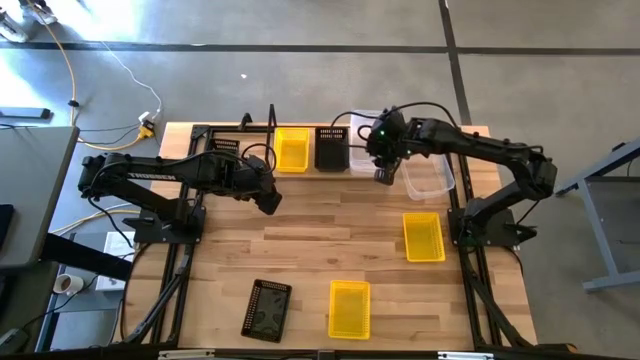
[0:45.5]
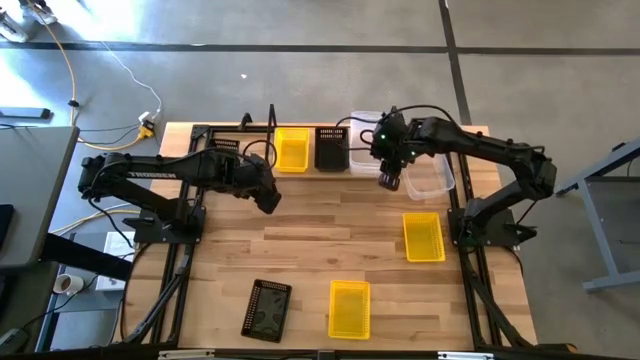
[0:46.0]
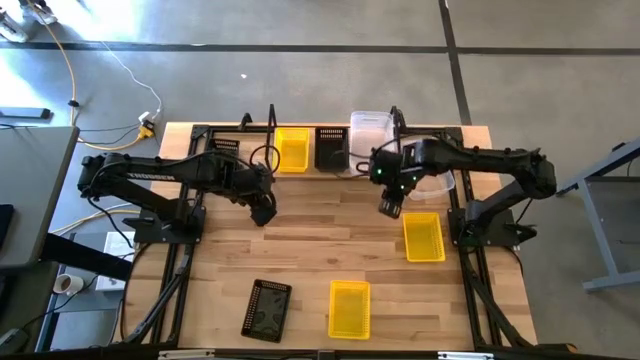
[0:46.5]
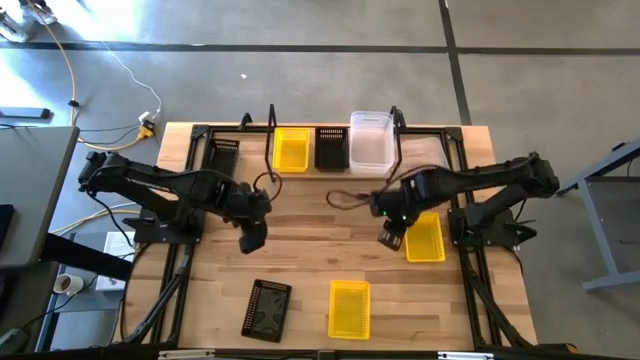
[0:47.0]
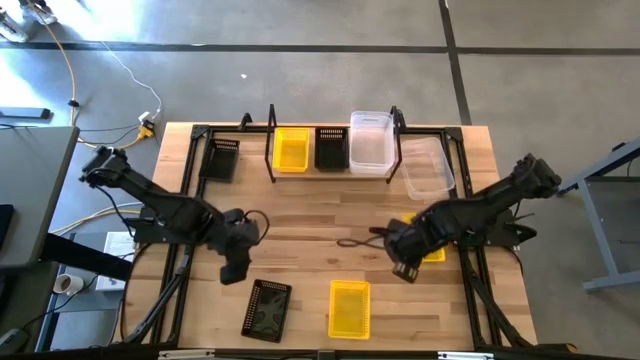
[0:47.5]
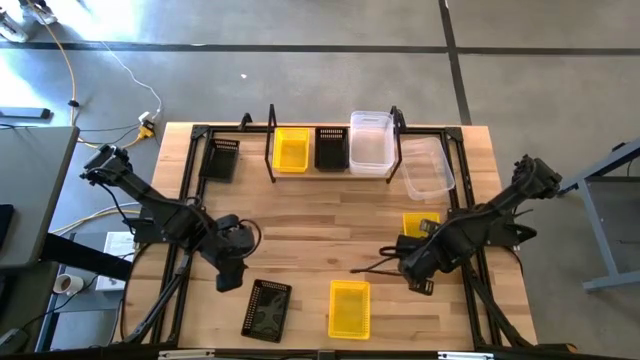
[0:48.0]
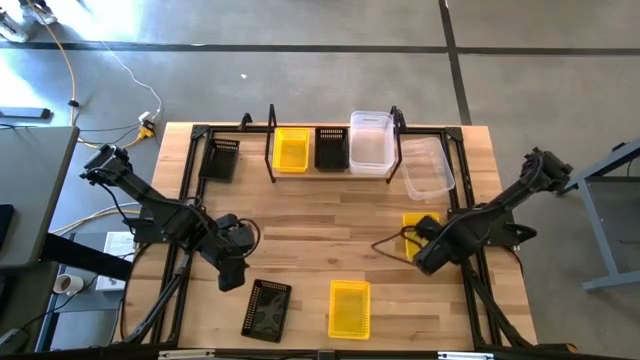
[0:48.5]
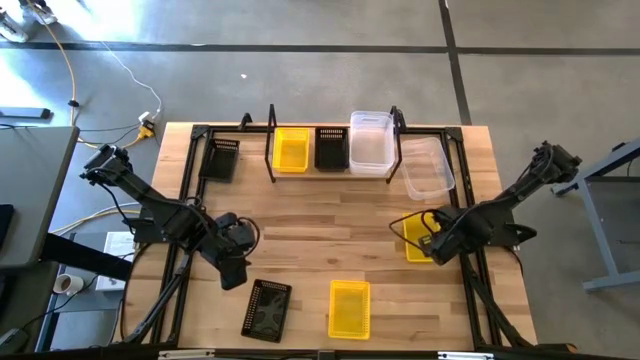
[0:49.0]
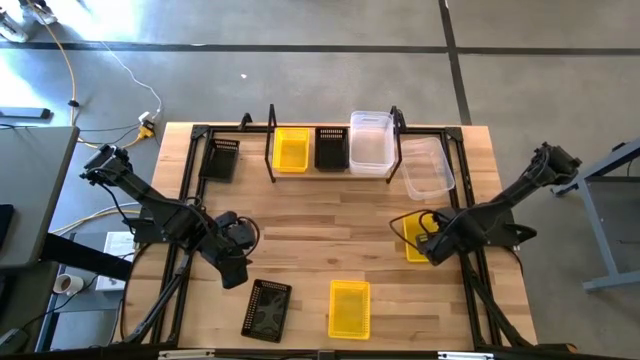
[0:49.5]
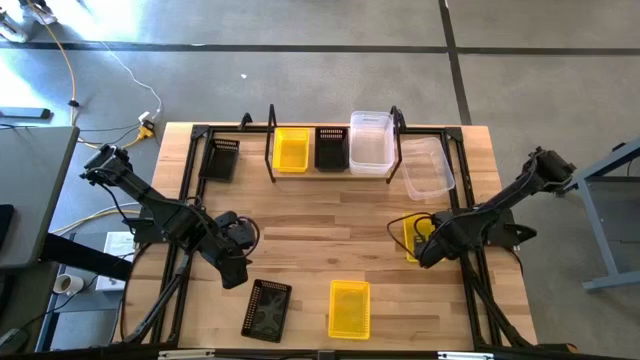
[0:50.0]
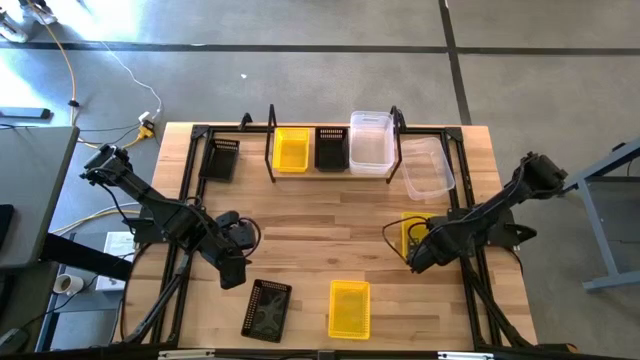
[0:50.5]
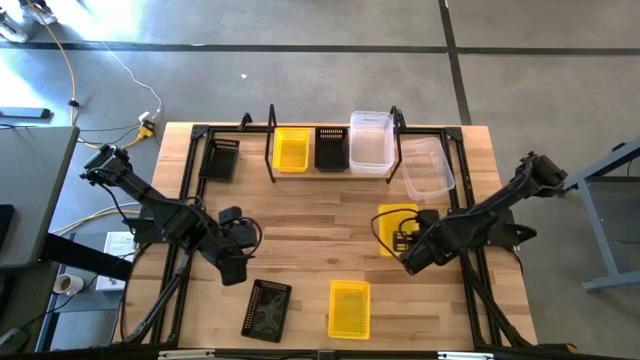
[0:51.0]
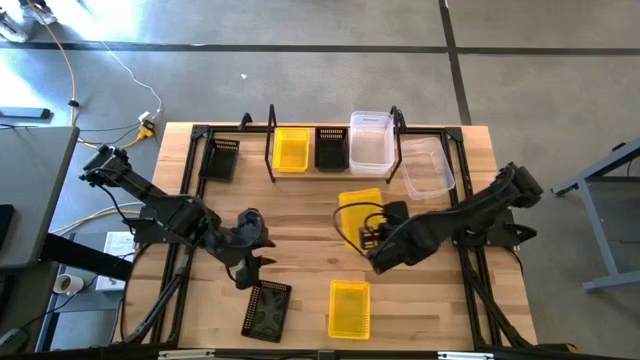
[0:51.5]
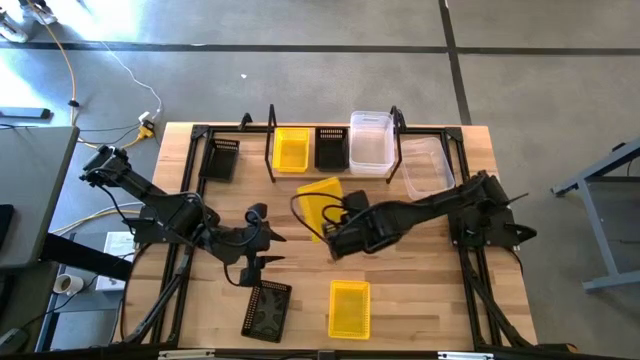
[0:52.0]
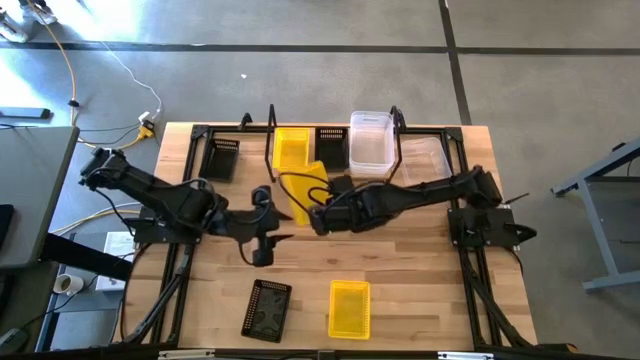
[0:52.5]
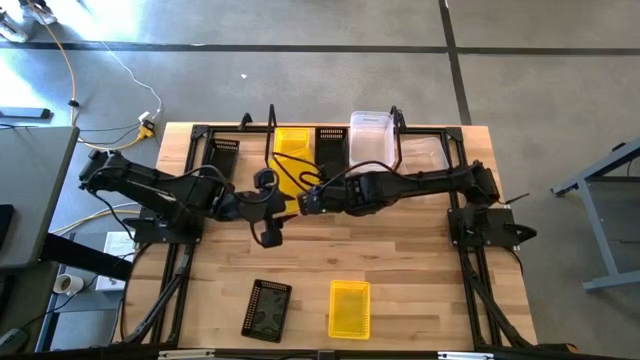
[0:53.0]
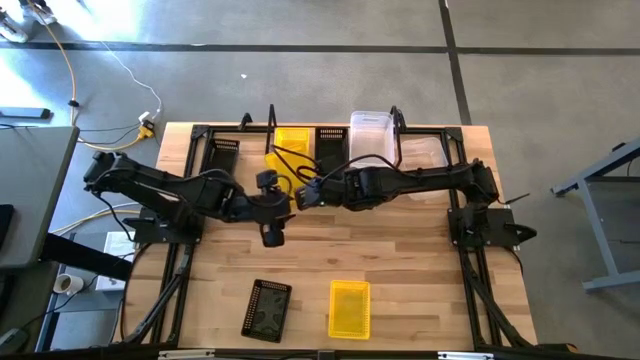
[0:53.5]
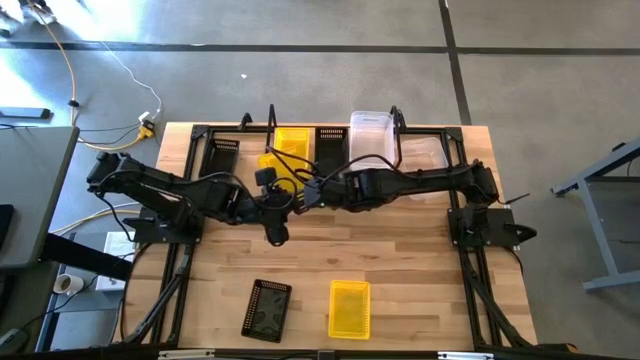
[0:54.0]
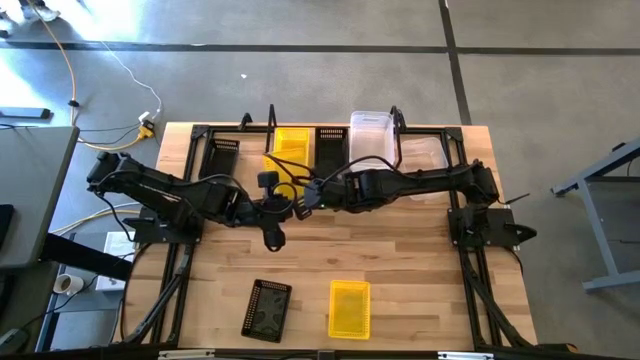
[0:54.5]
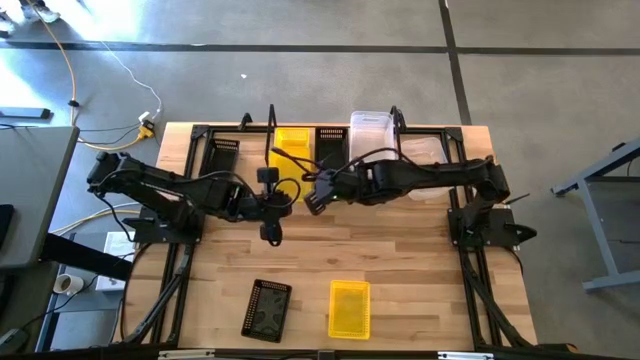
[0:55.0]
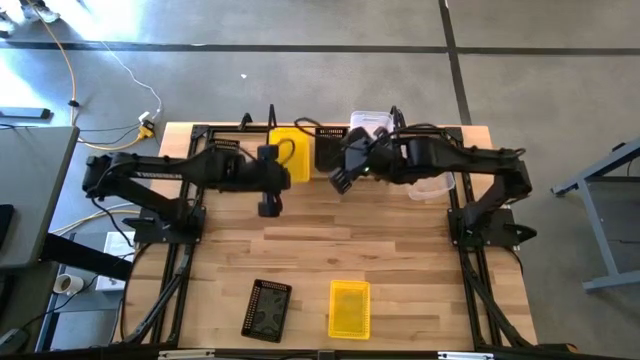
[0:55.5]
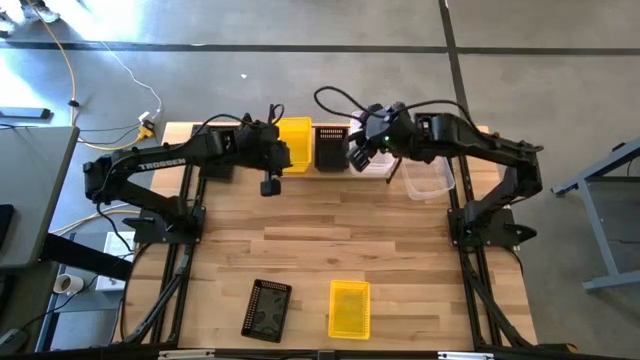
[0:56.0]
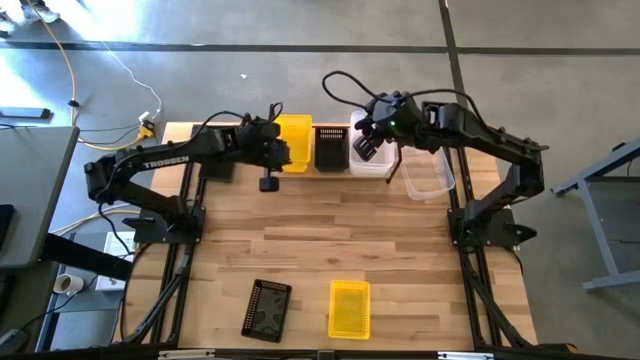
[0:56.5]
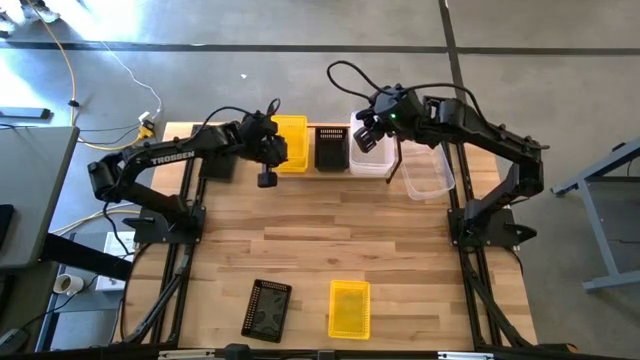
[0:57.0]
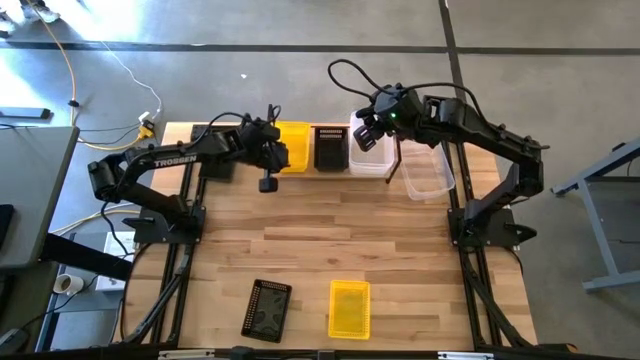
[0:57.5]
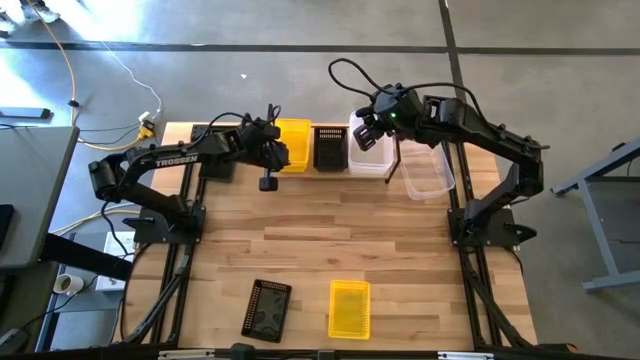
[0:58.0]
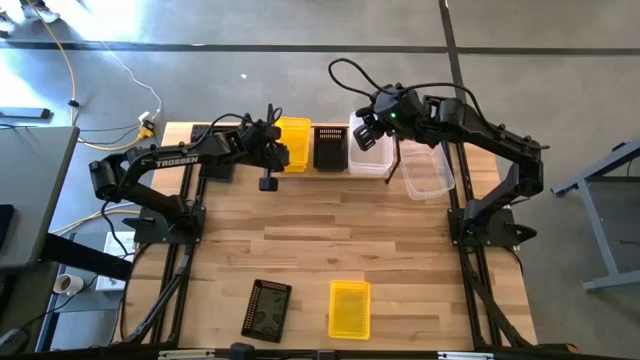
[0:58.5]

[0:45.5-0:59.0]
Task: Stack baskets on shelf by color
Stack the top yellow bin on top of the yellow bin on the shelf

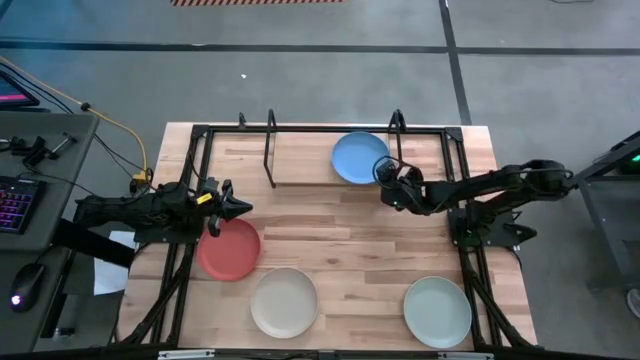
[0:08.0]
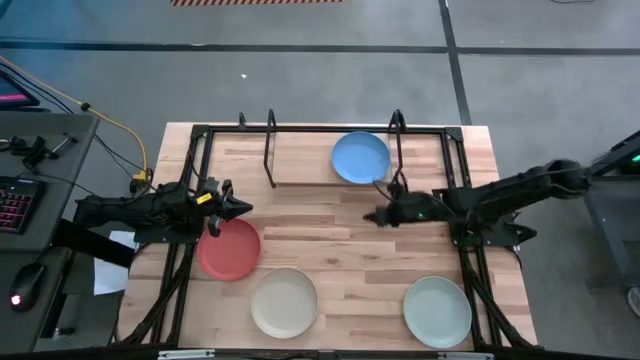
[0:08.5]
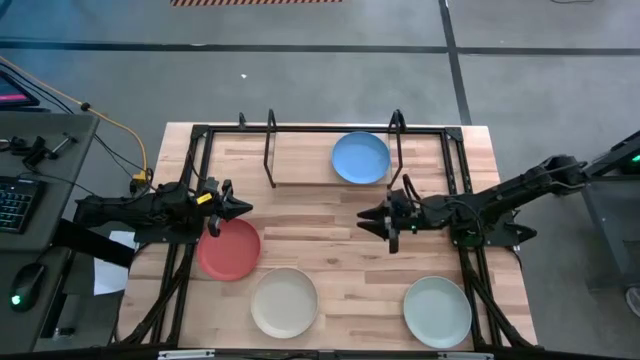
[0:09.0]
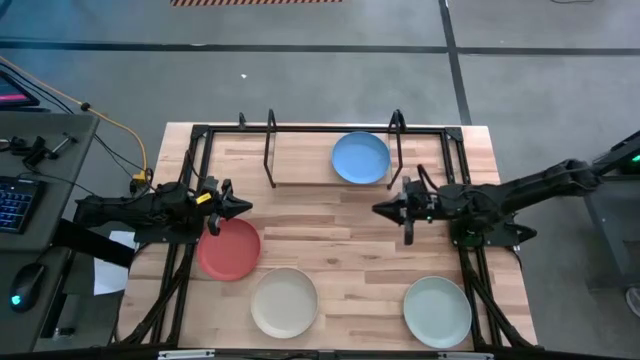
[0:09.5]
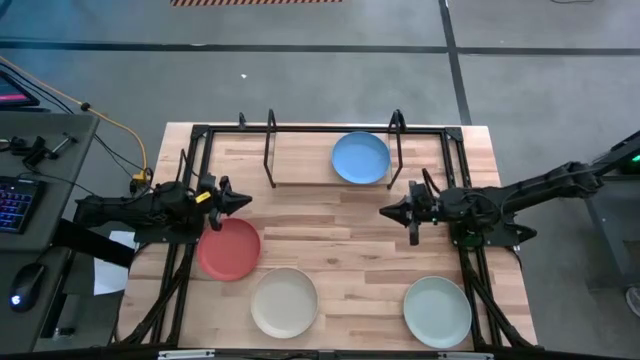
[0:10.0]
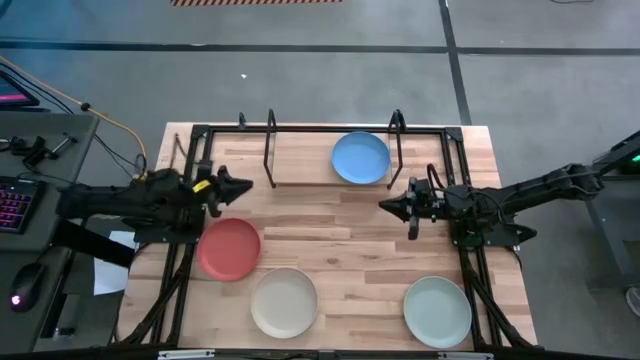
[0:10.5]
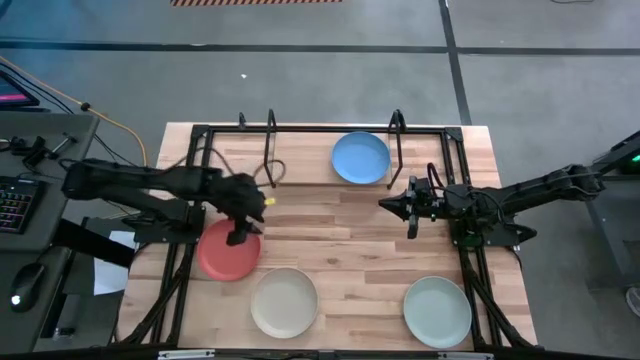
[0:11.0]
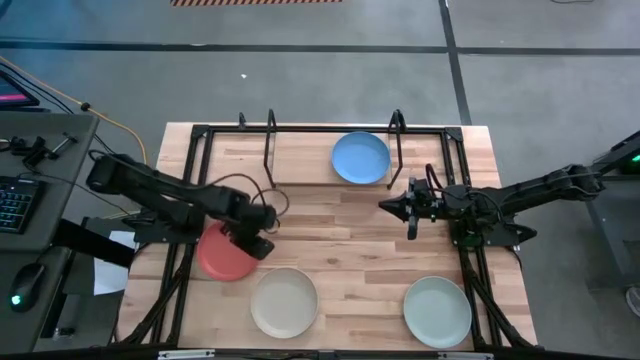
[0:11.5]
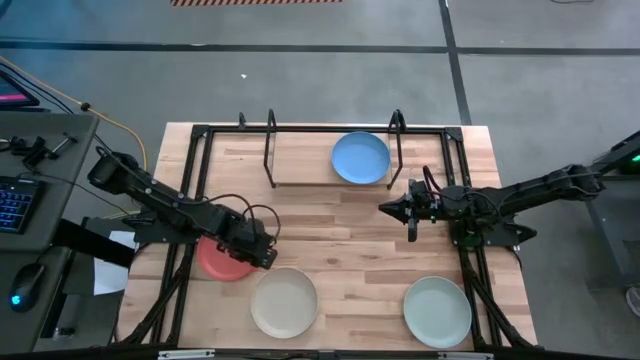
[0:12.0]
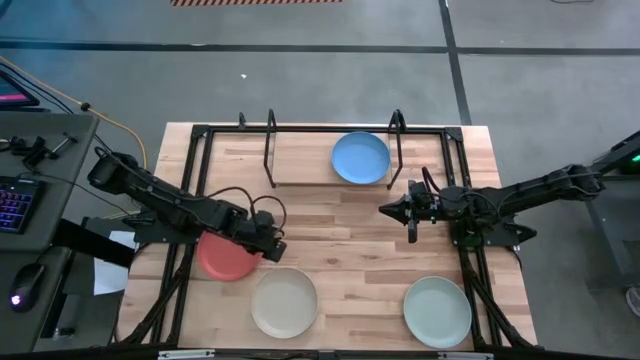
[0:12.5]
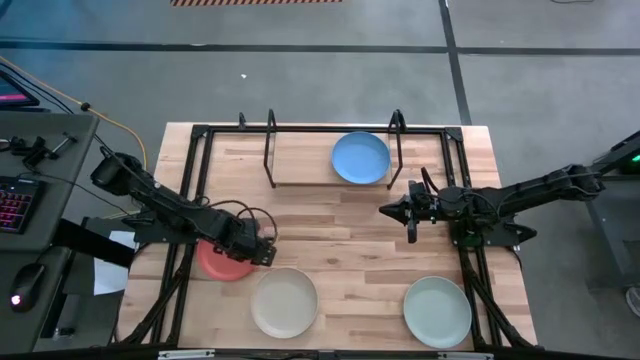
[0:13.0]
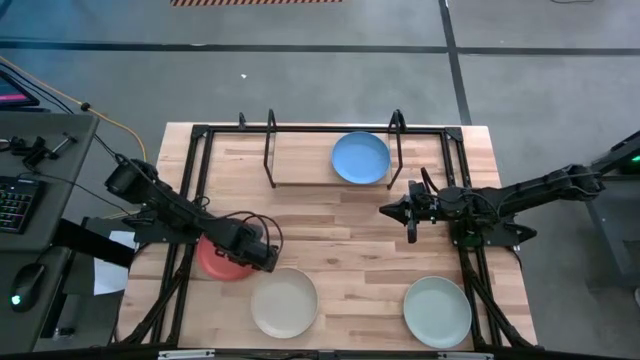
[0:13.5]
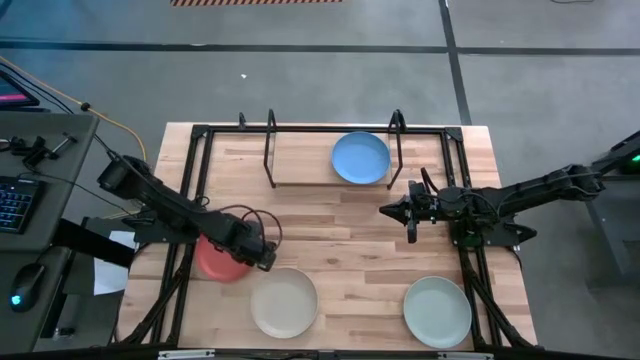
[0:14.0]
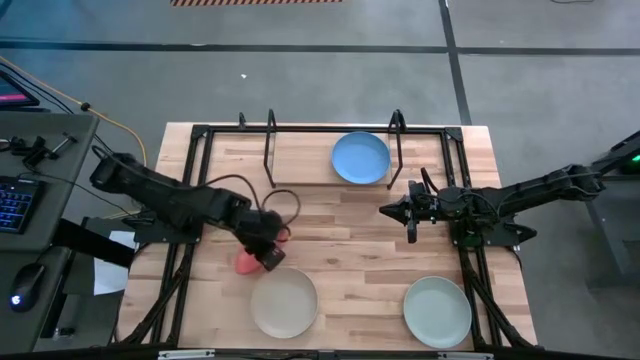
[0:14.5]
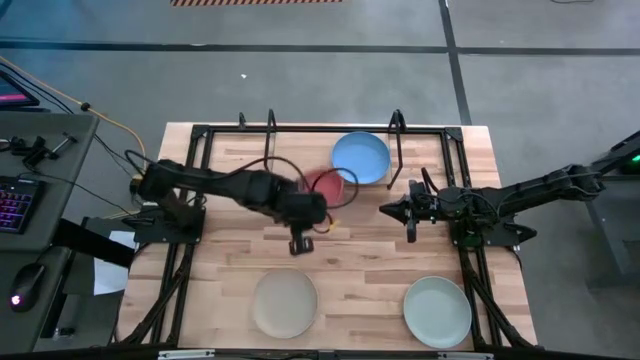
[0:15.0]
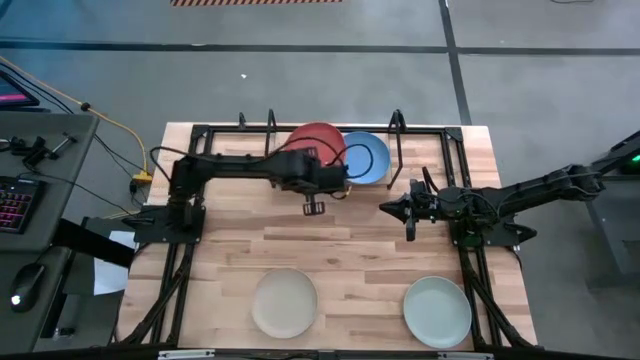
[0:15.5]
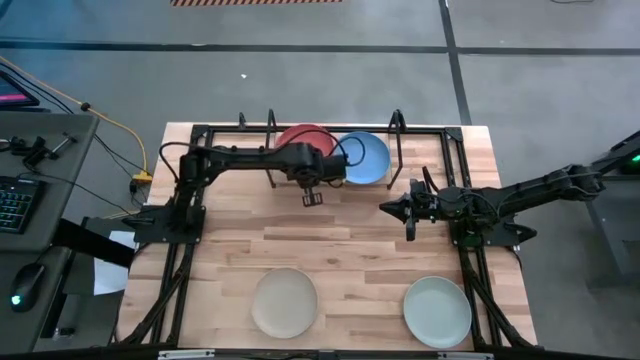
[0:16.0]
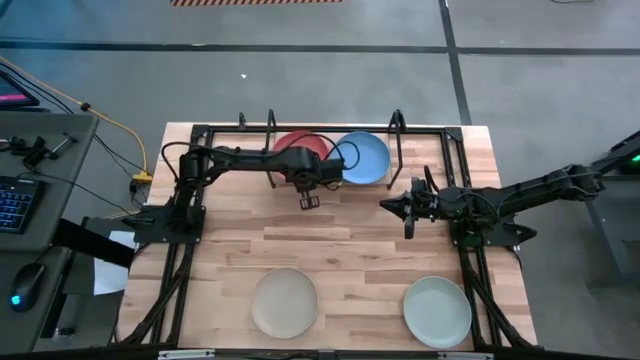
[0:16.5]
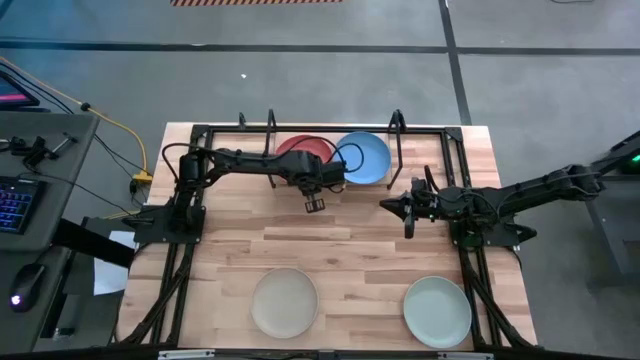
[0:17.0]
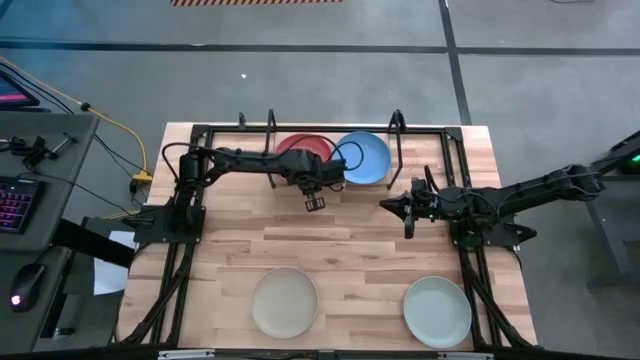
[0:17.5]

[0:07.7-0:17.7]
Task: Place and stack plates onto a shelf
Put the orange plate on the shelf
